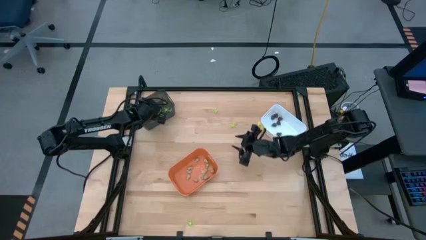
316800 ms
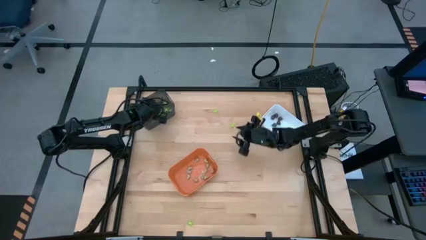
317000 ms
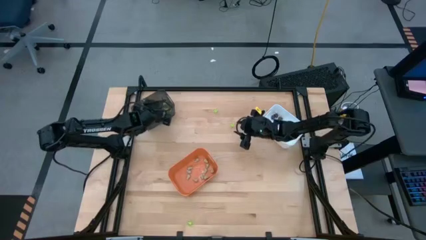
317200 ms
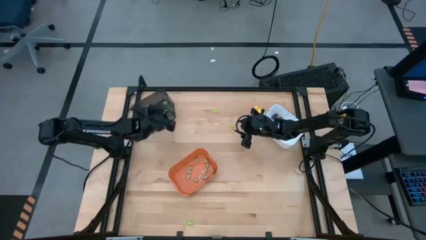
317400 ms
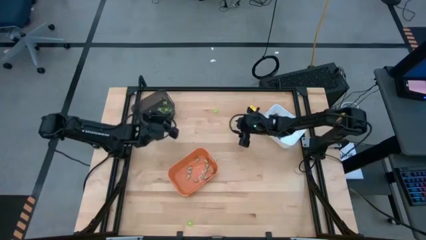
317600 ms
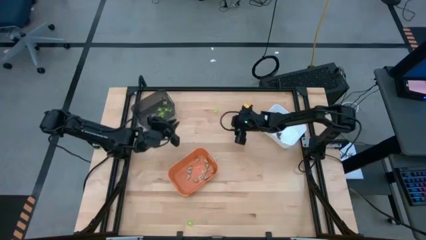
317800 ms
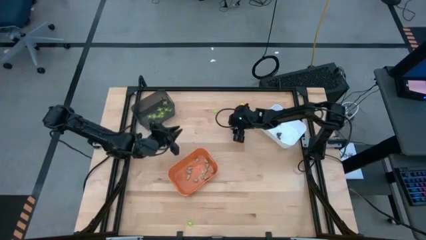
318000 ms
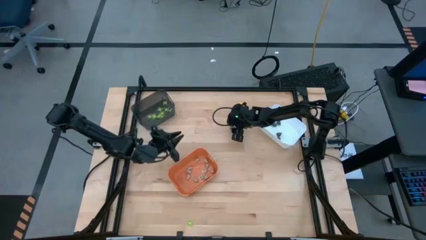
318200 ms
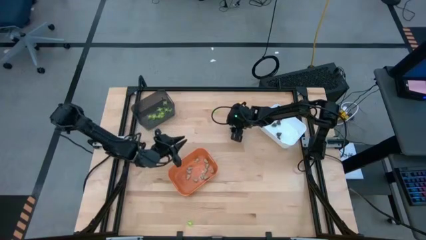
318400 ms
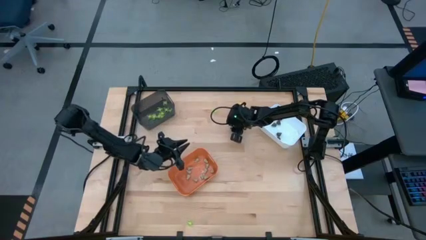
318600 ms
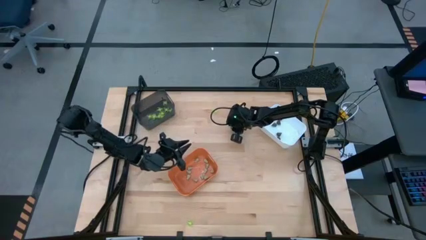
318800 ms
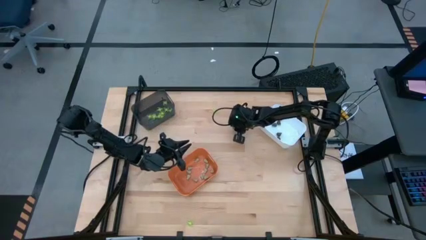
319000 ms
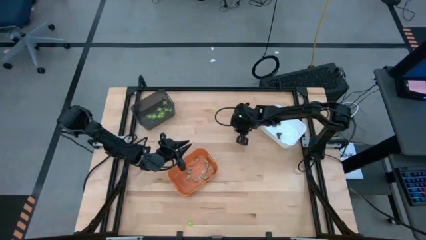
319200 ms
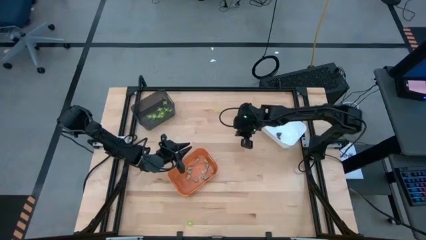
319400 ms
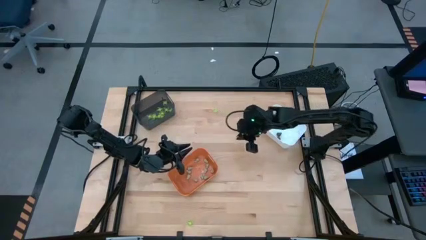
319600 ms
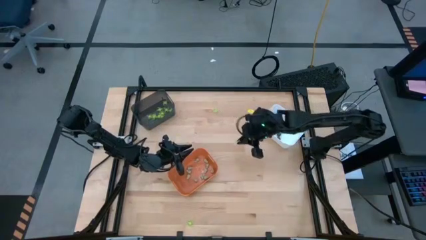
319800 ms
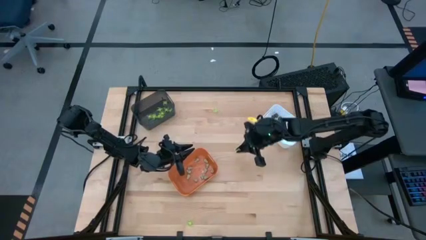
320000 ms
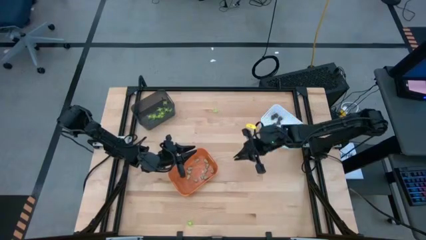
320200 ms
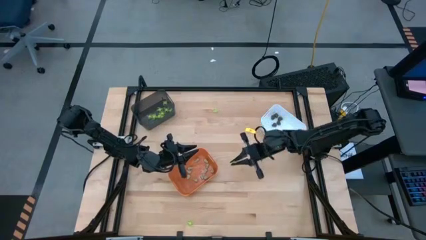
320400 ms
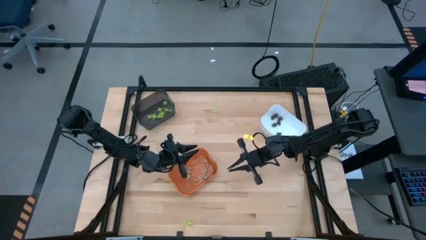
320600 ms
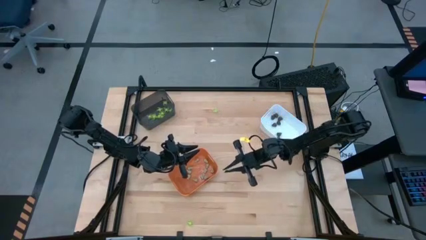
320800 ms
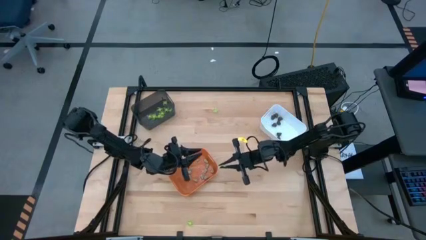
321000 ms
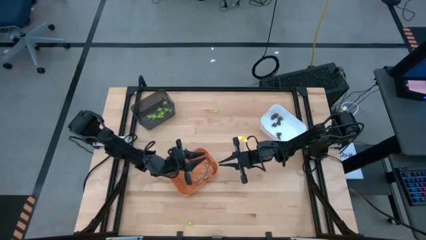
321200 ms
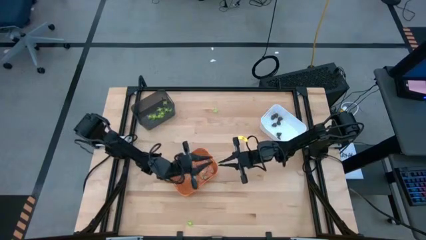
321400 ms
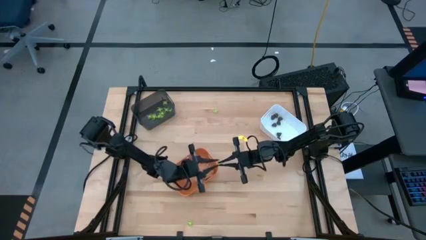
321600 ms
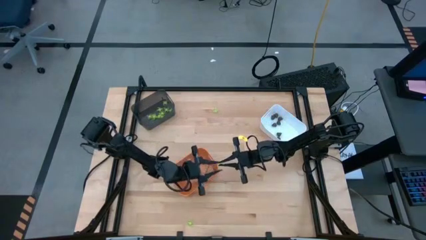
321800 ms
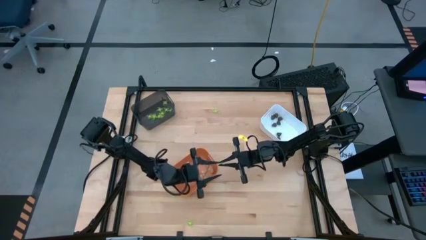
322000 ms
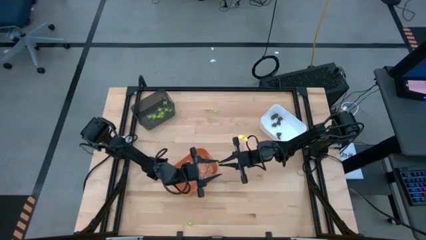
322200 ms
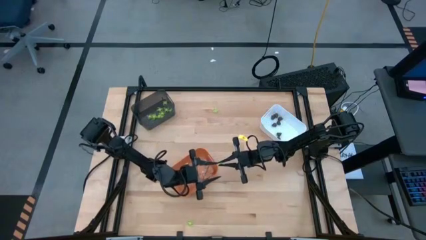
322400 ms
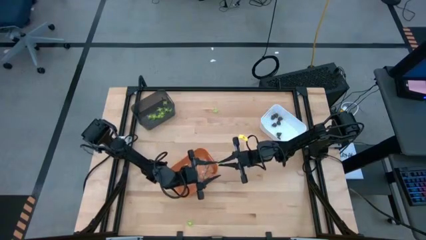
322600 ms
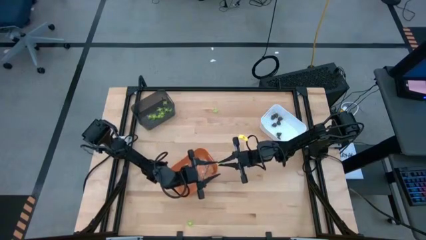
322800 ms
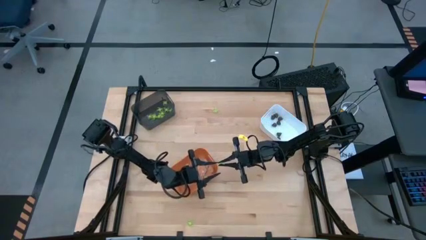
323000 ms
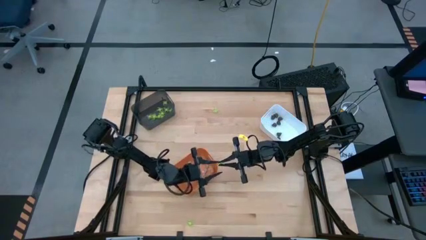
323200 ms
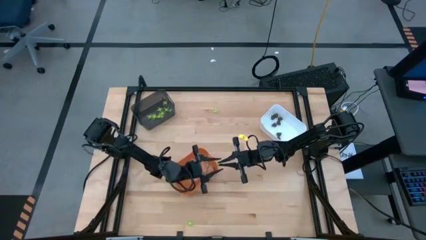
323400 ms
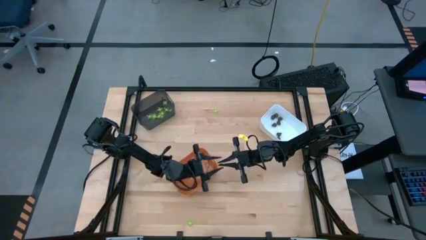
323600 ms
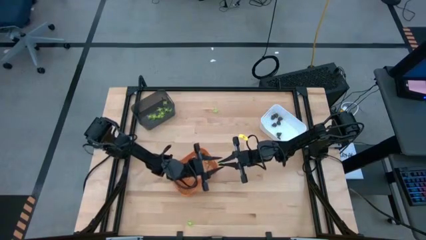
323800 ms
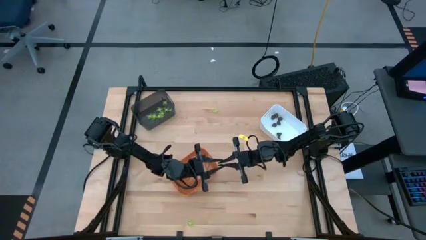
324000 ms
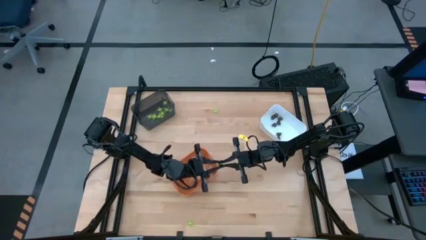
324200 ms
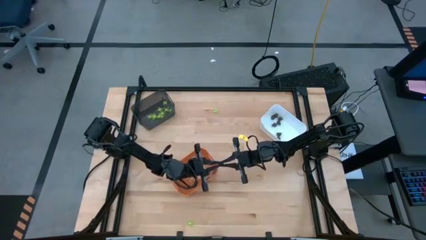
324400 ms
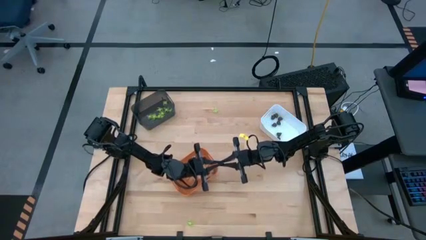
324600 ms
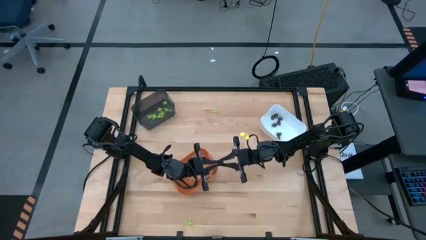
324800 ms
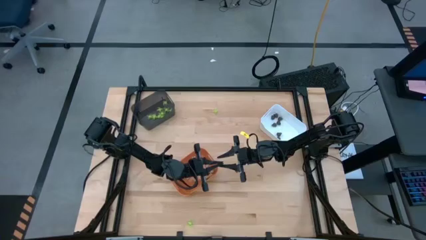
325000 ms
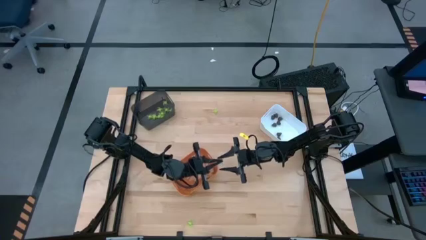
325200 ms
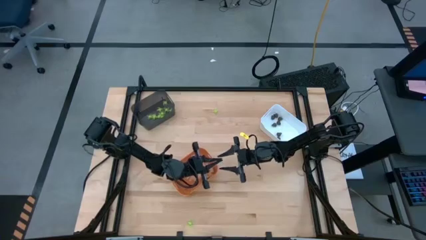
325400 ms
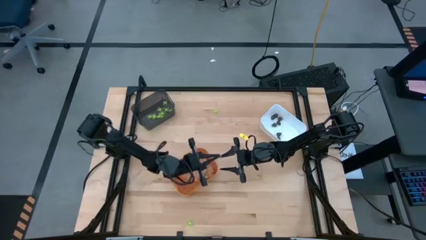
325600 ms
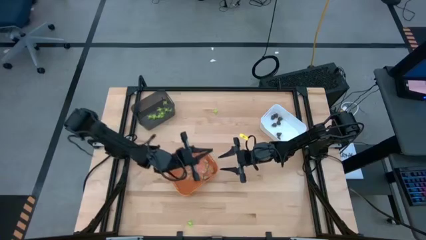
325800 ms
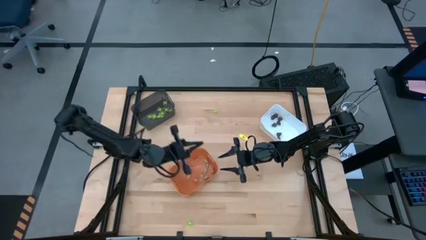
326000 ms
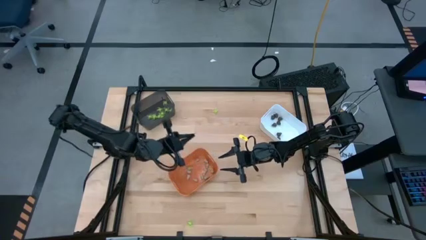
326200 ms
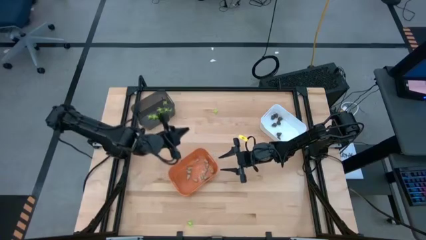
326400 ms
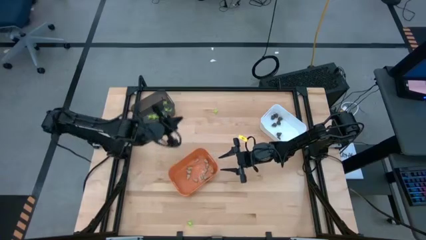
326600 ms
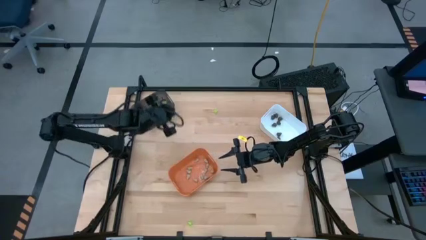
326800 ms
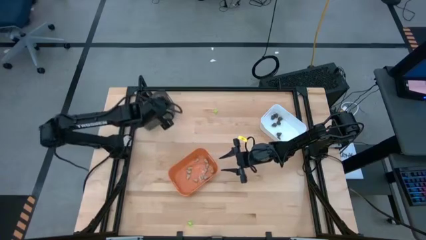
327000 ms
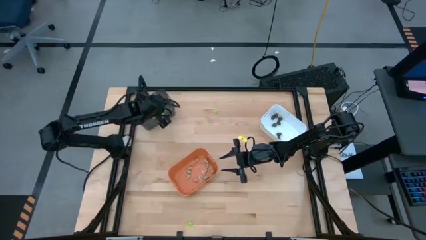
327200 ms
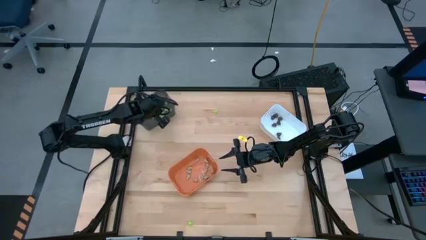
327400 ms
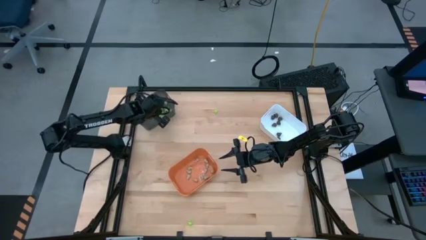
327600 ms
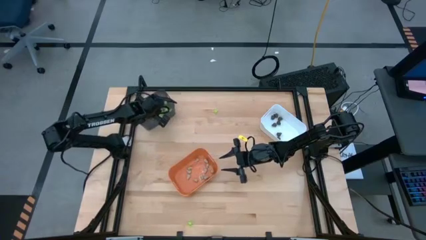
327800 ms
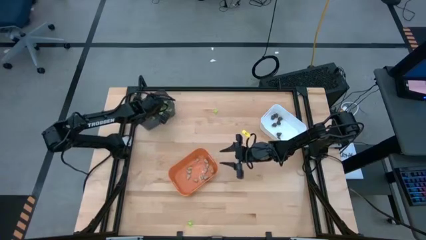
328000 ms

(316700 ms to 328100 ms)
Task: Sort Halloween decoration
Put the green spider toy into the black bin

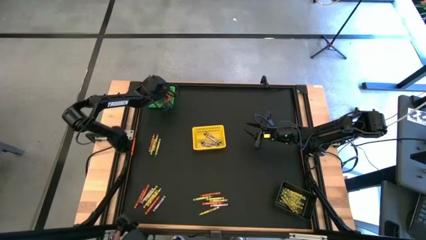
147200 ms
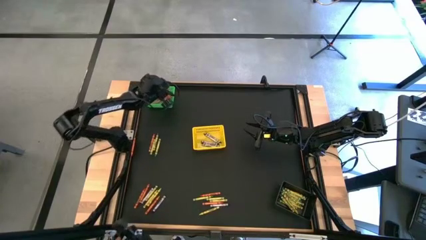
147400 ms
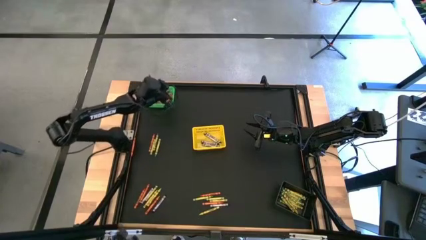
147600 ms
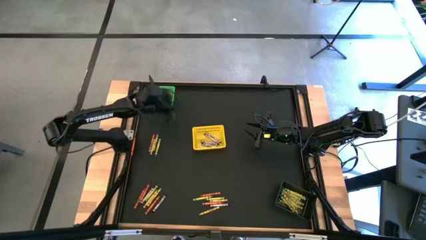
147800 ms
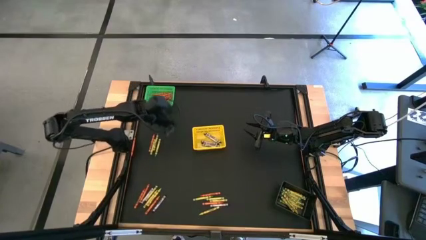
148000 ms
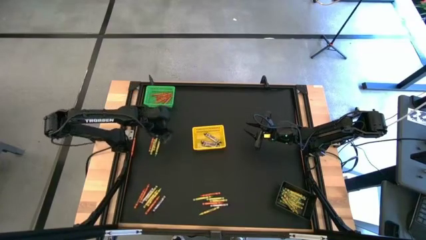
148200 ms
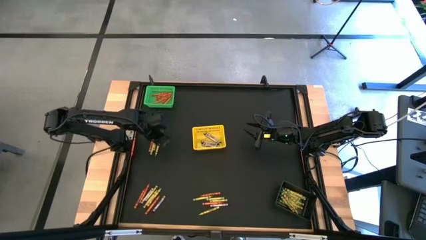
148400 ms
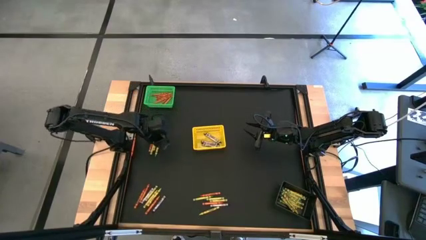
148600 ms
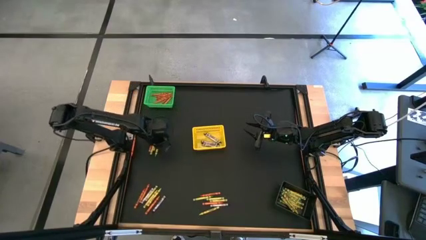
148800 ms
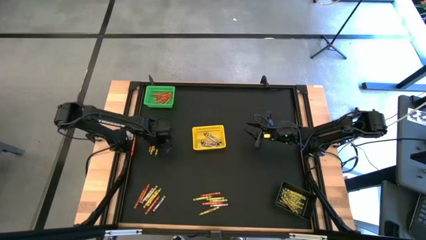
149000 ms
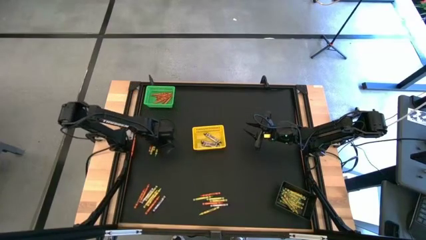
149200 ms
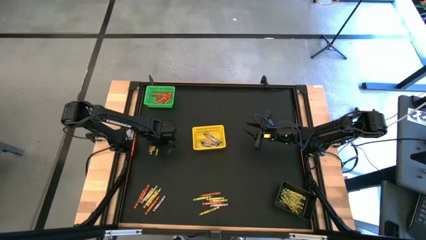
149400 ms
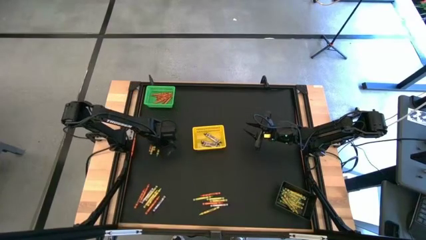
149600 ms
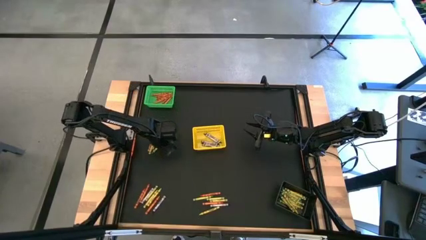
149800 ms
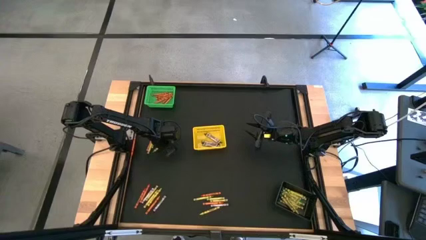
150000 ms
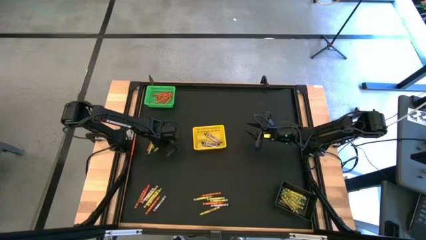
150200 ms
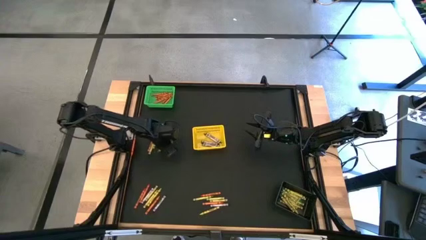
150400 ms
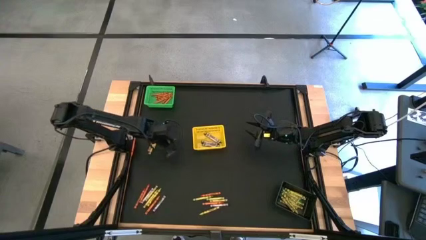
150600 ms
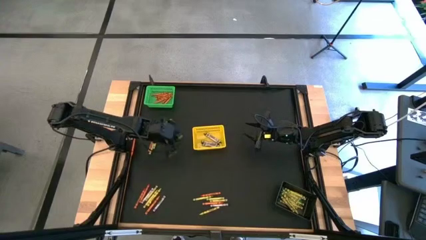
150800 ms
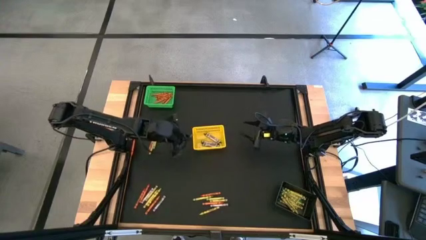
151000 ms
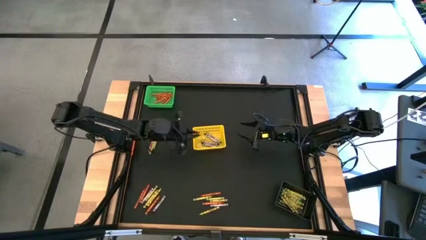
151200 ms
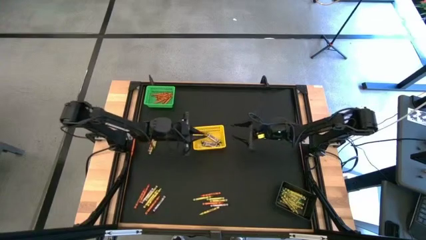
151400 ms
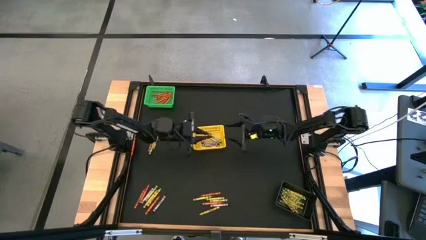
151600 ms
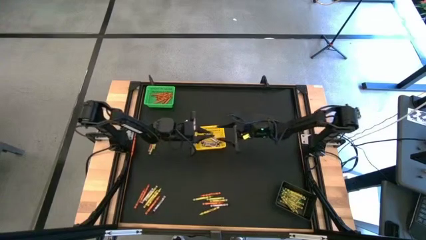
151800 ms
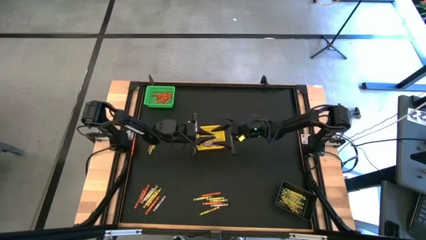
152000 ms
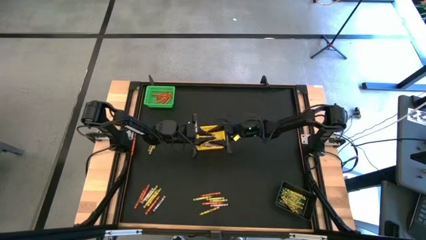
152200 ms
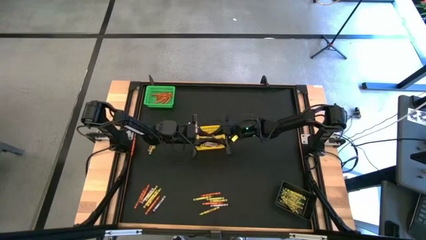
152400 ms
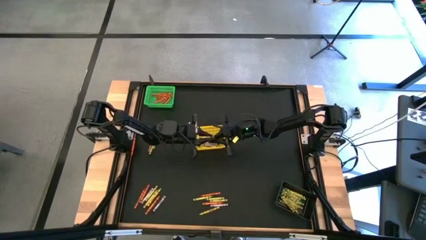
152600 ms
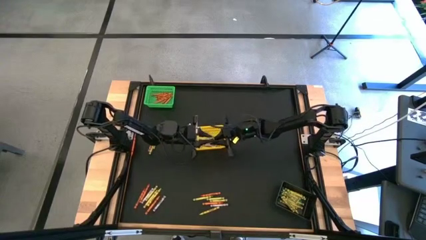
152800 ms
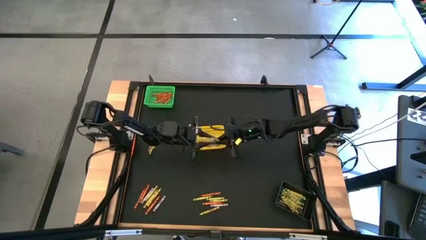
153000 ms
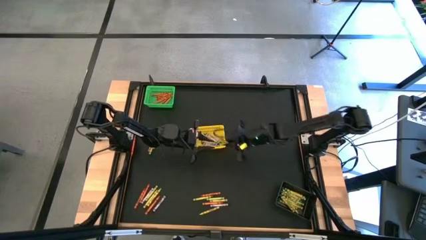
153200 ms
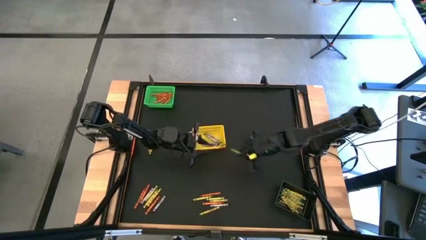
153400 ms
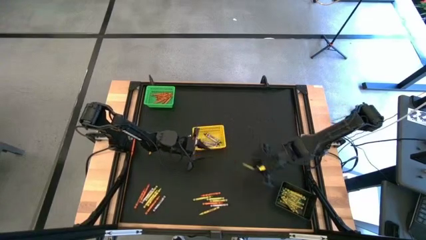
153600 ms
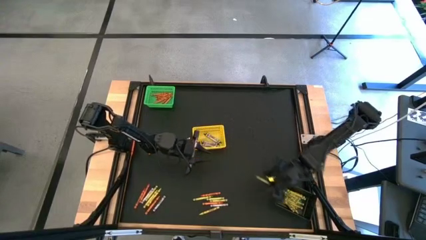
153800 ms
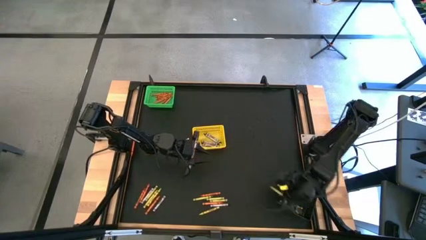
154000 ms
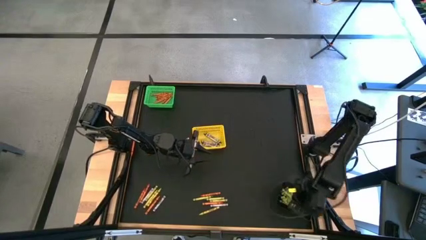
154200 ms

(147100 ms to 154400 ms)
Task: Sort crayons
Put the green crayon into the black bin
